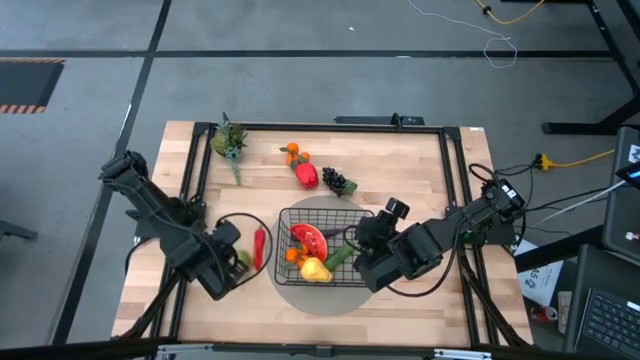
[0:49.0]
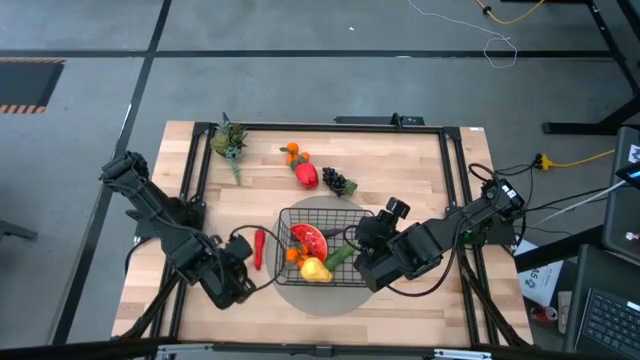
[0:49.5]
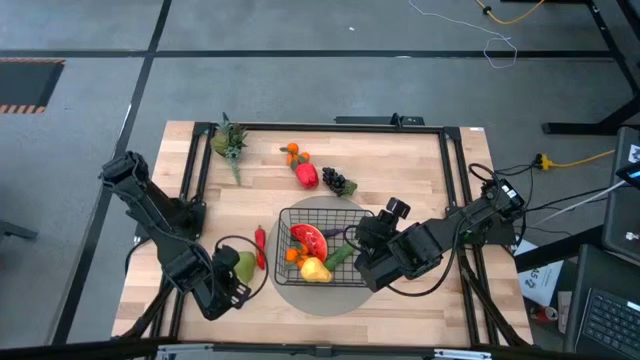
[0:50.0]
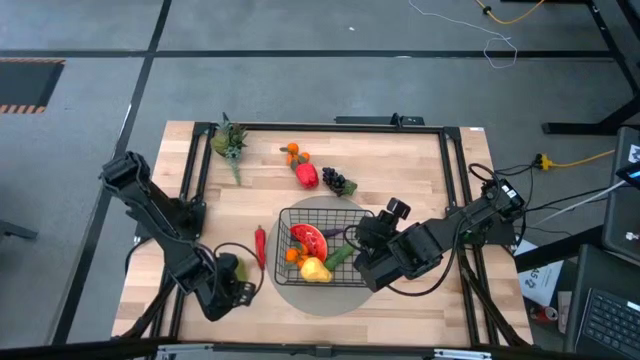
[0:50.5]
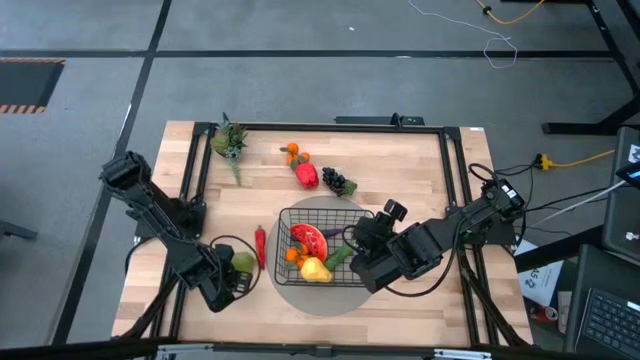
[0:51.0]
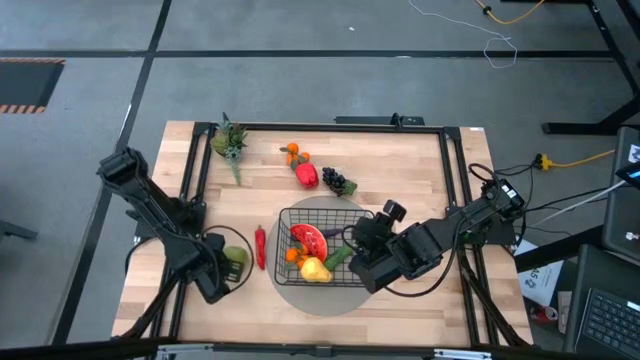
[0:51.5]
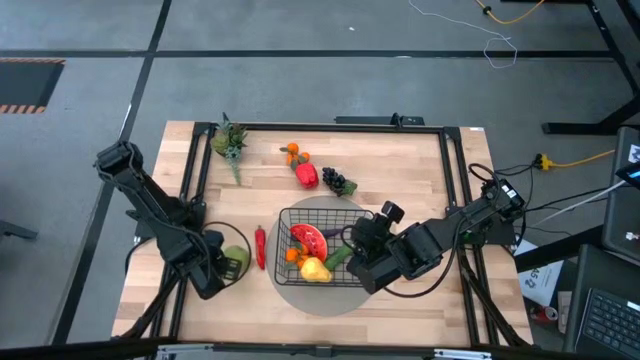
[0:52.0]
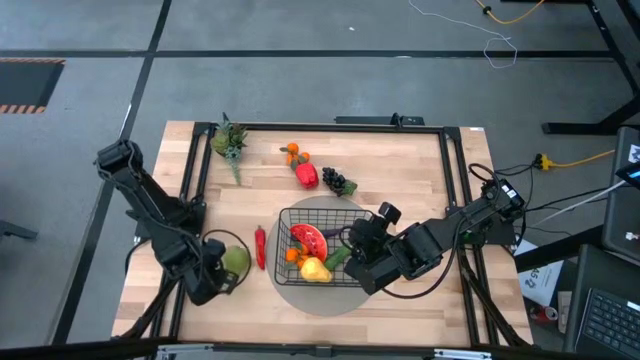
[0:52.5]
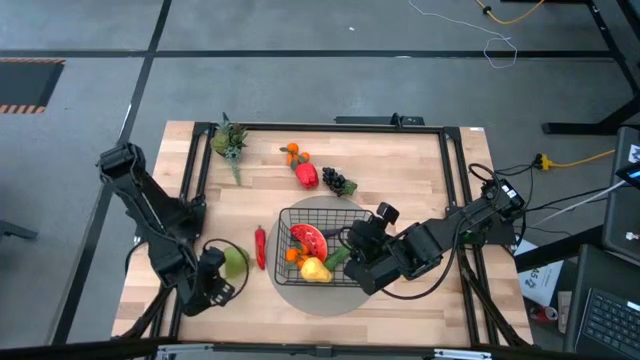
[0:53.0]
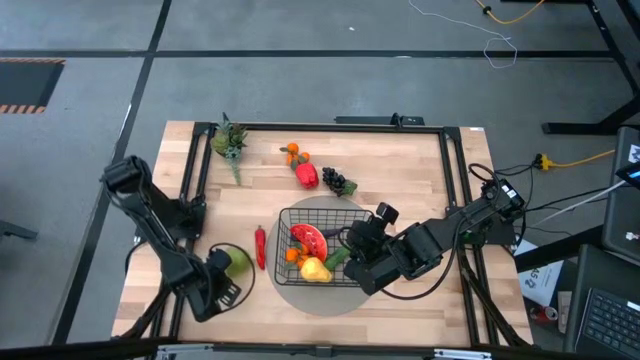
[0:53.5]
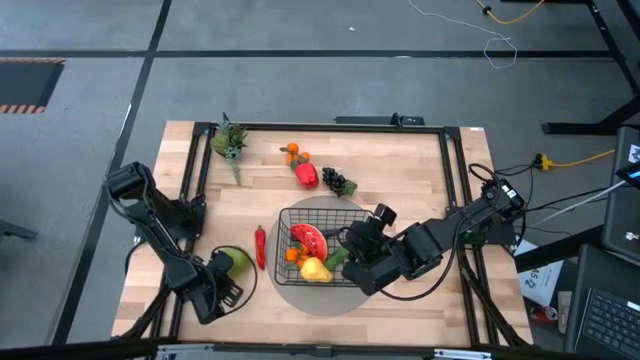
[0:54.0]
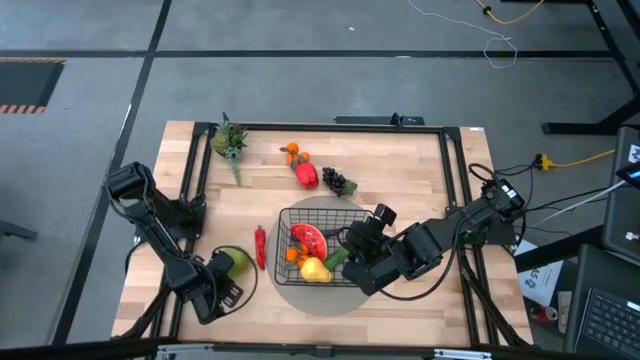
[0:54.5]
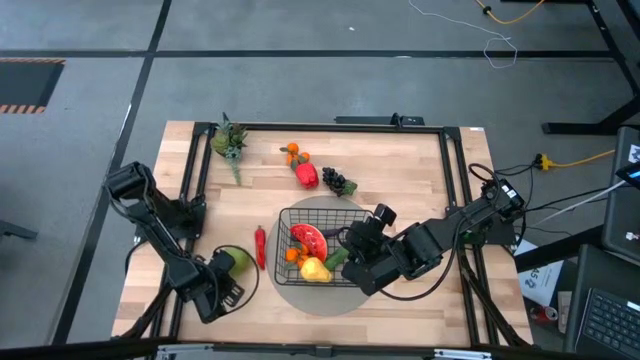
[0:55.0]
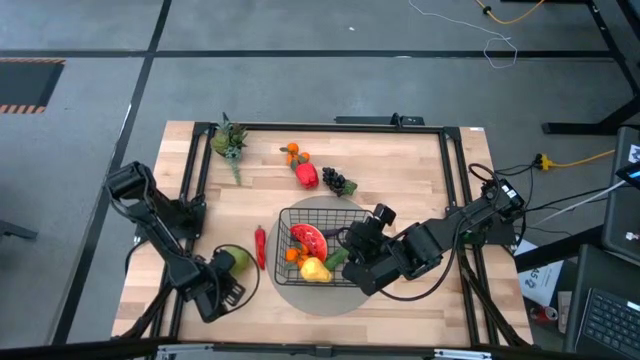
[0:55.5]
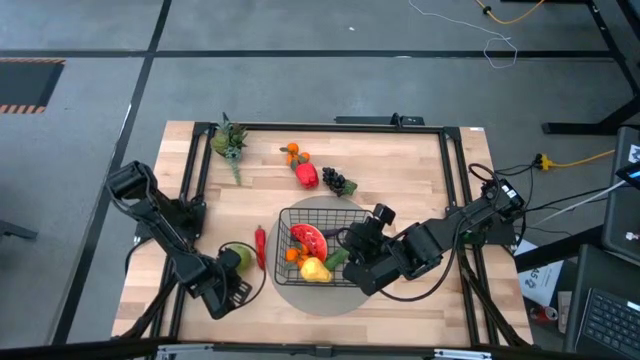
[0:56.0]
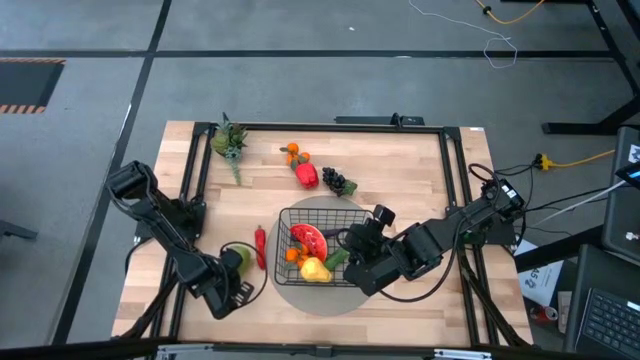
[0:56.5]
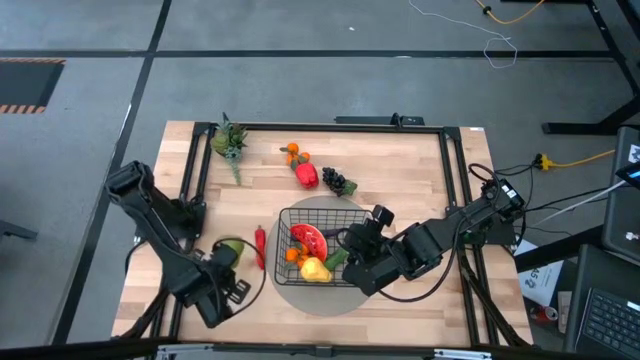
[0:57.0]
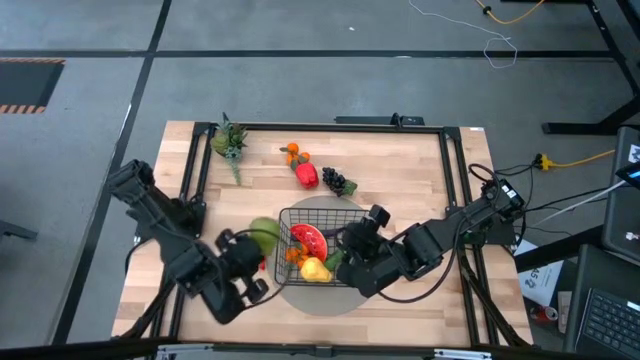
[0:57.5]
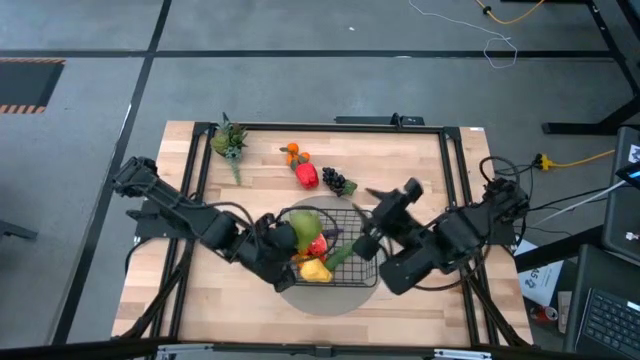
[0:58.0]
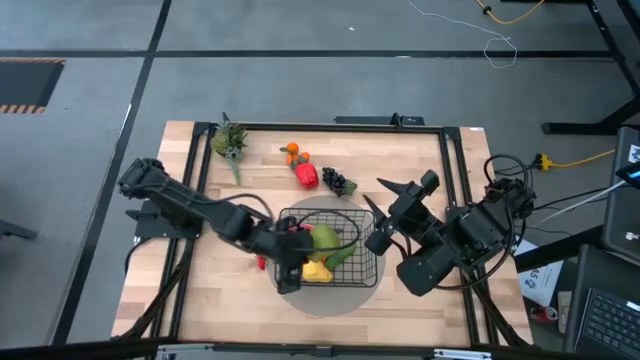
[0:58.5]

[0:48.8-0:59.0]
Task: Build produce basket
Put the green pear into the black wire basket

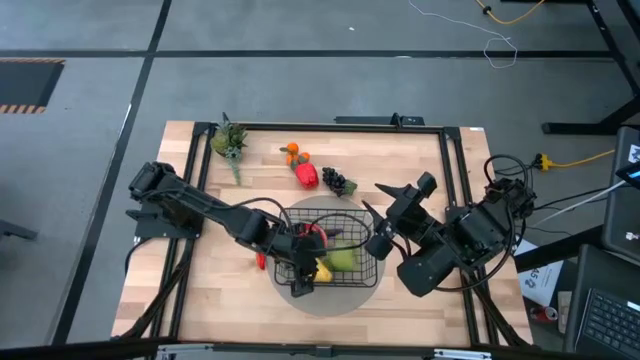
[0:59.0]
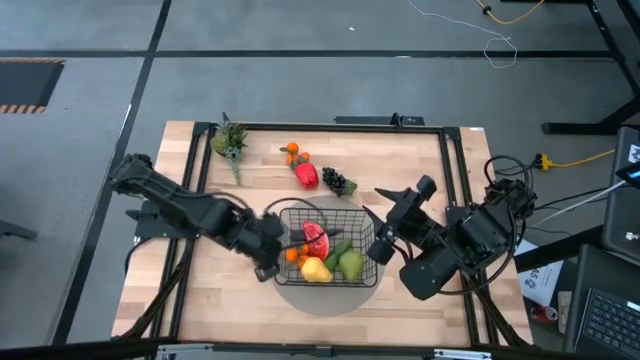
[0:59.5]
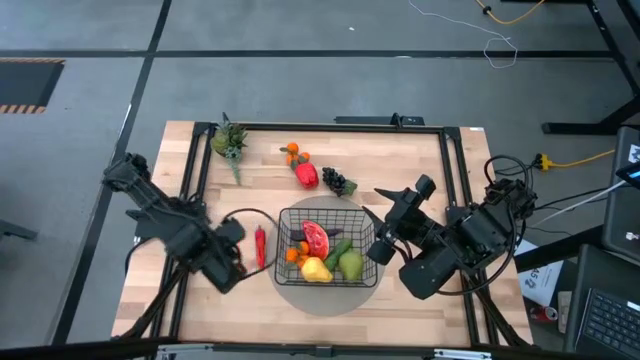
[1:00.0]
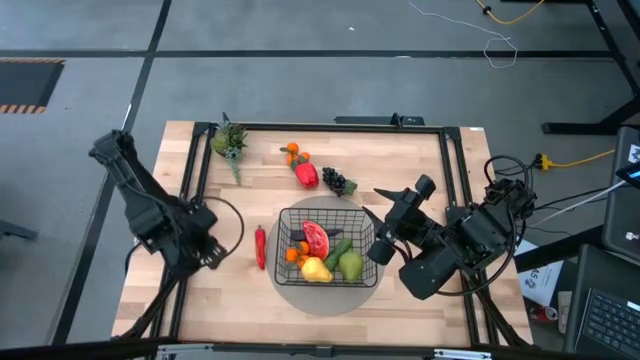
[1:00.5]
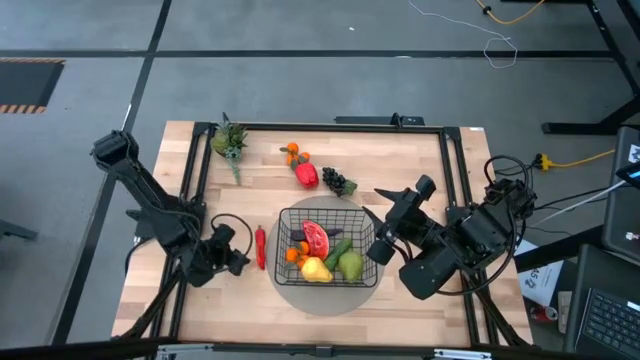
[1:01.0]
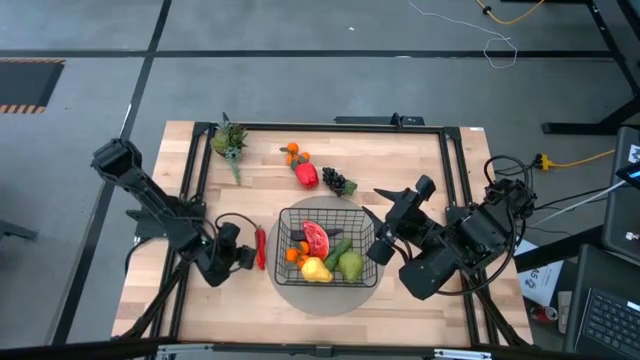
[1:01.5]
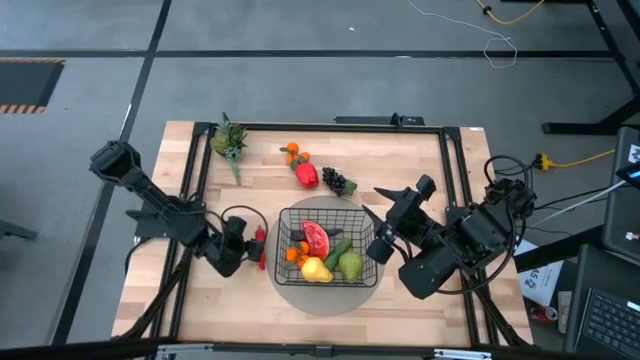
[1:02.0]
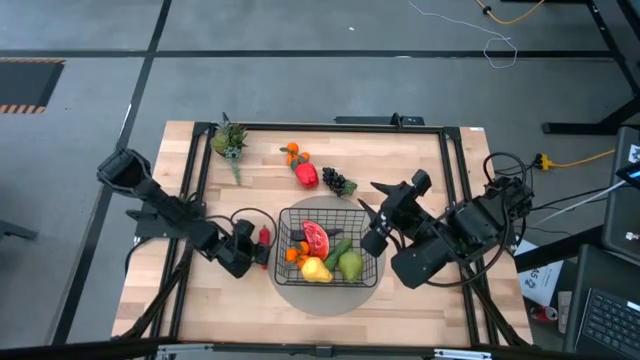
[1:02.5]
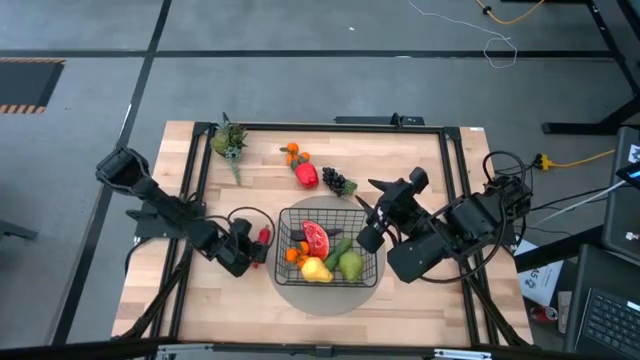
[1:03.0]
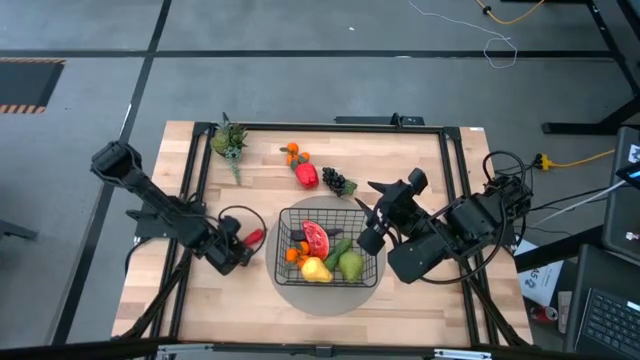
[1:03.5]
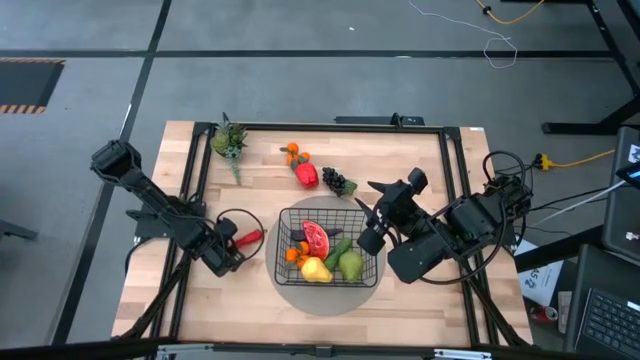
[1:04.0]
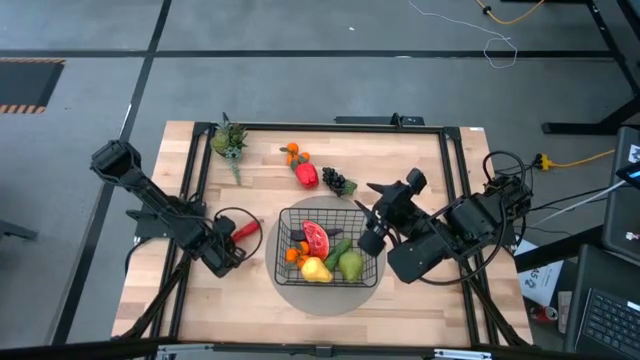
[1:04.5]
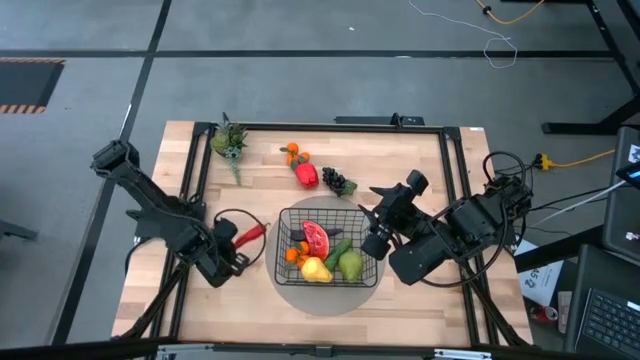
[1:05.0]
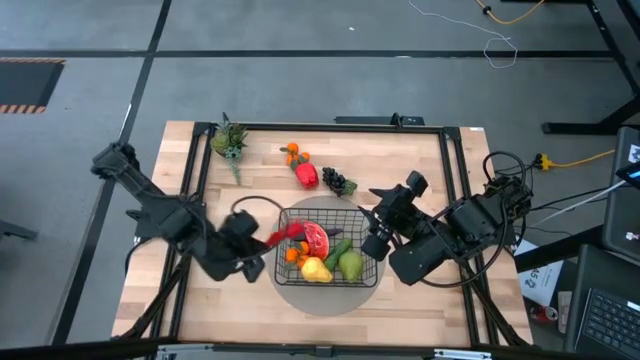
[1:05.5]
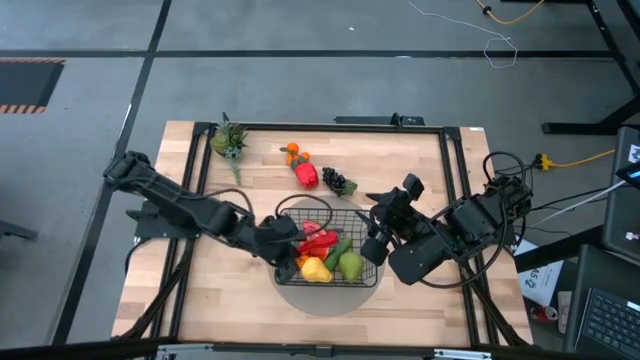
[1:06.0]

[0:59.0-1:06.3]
Put the red chili pepper into the black wire basket

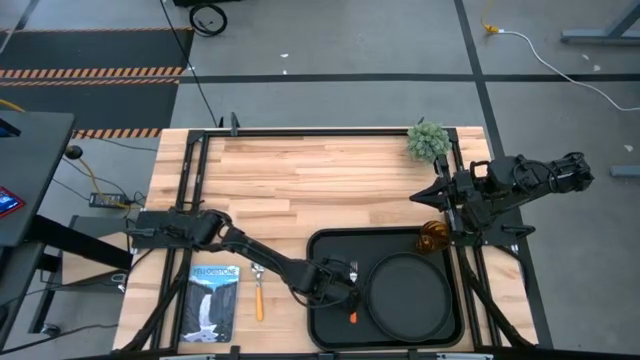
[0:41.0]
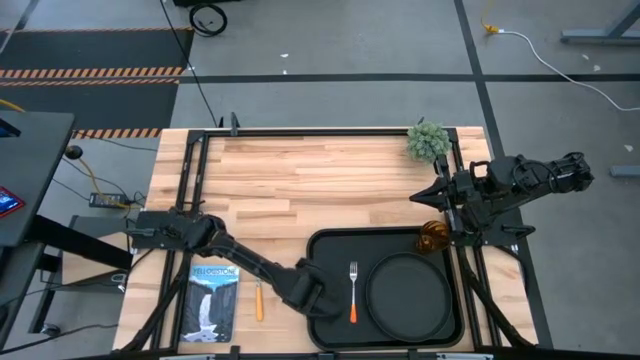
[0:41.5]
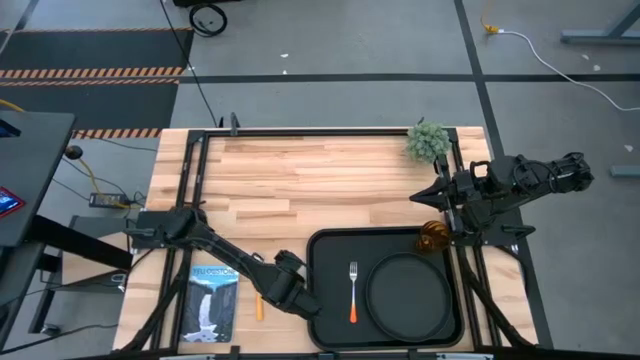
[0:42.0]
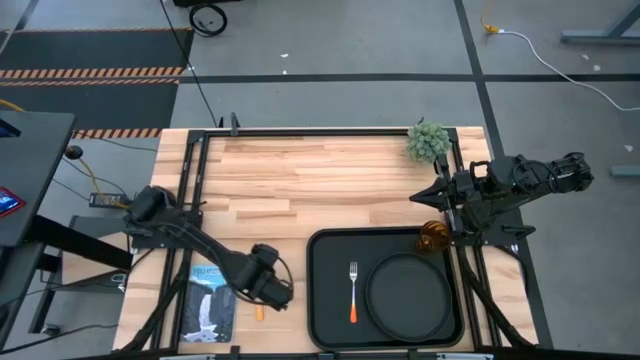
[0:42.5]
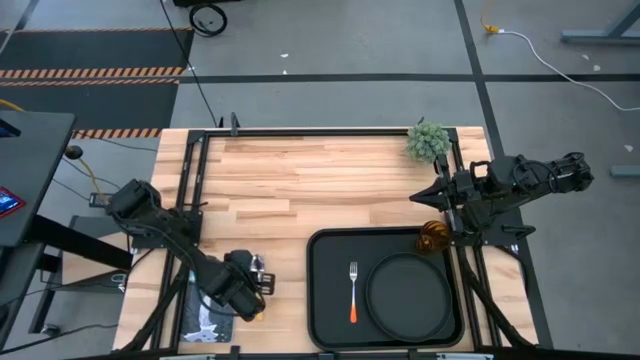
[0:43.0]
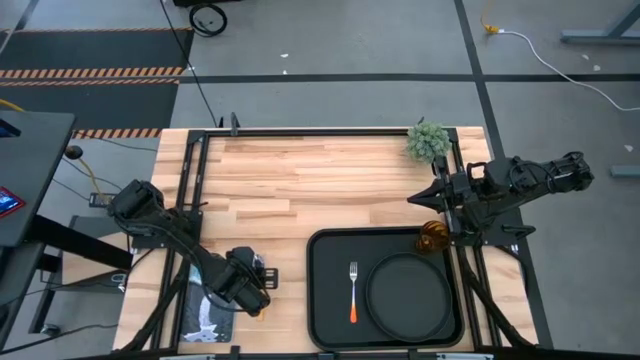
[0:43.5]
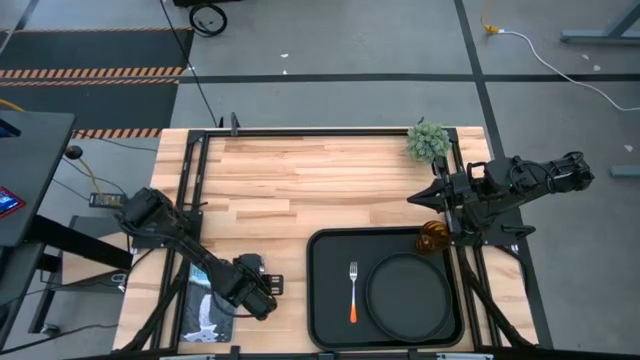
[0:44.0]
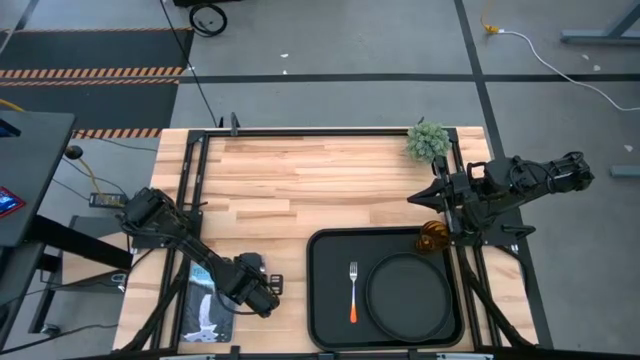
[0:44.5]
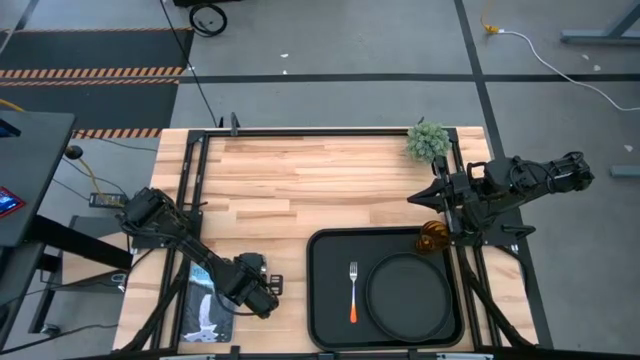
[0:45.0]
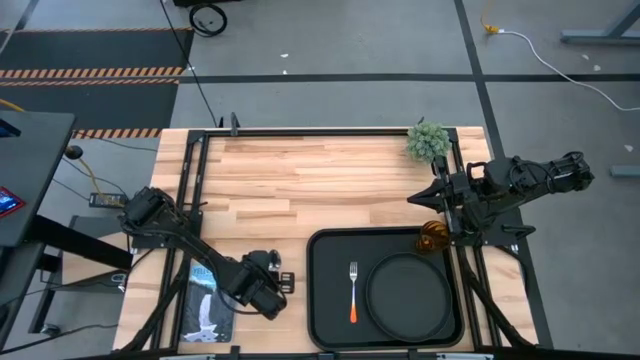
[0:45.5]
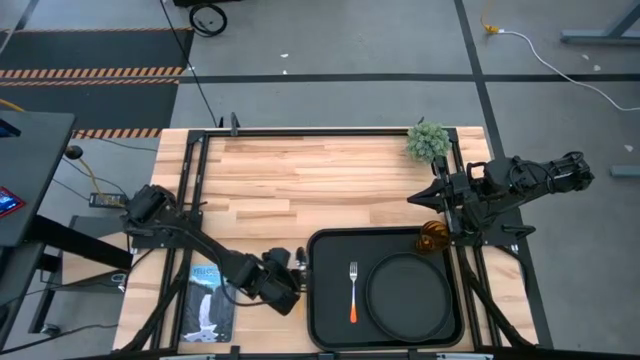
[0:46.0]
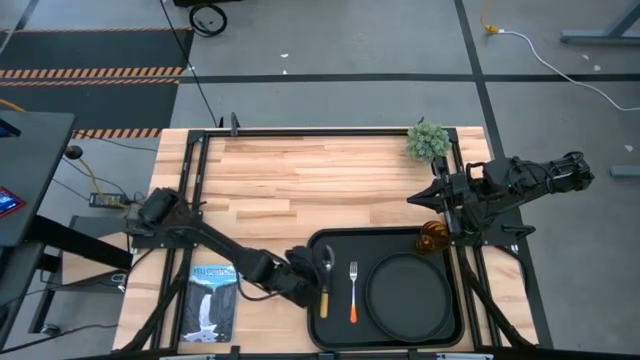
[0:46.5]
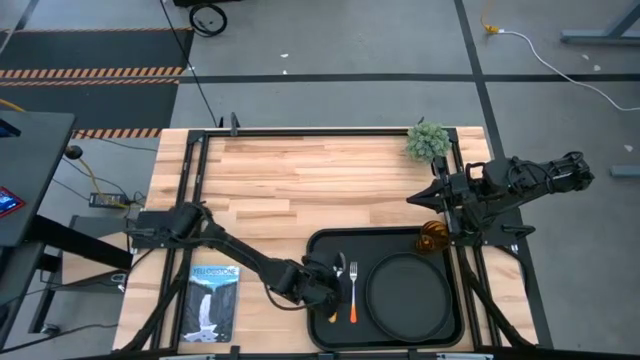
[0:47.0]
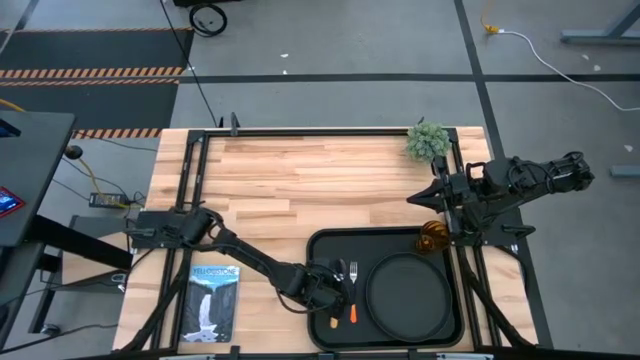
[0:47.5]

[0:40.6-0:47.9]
Task: Pick and place plate/cup/fork/spoon on tray
Put the yellow spoon on the black serving tray to the left of the orange fork
